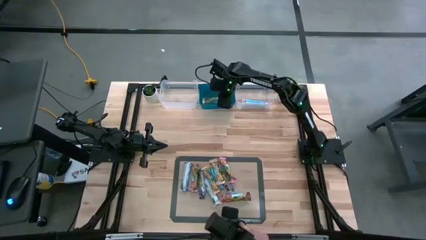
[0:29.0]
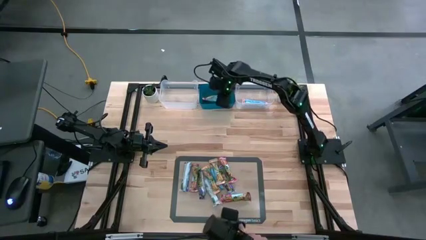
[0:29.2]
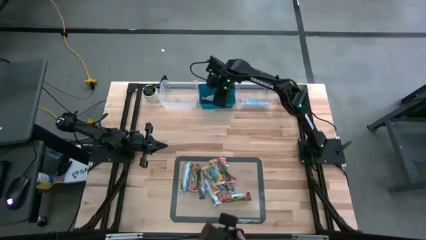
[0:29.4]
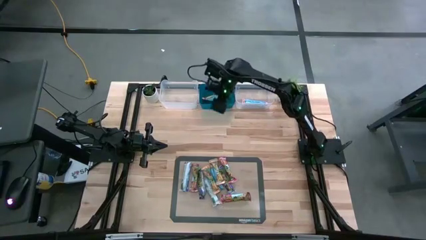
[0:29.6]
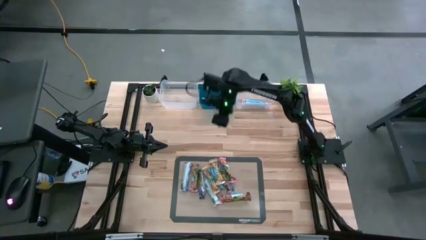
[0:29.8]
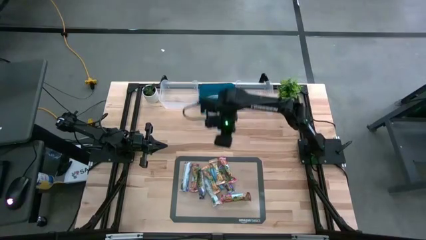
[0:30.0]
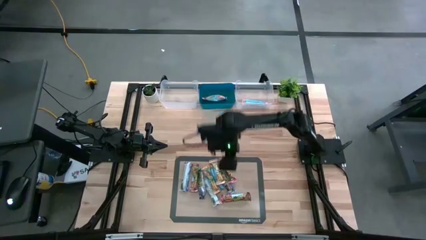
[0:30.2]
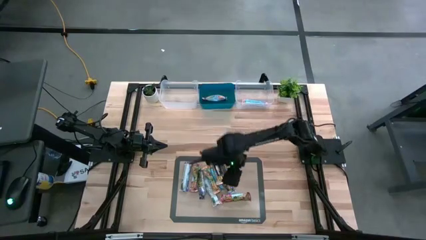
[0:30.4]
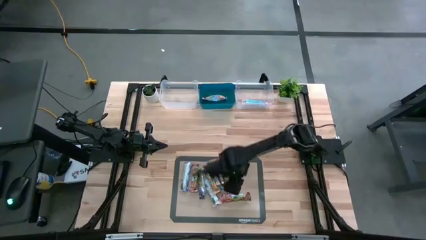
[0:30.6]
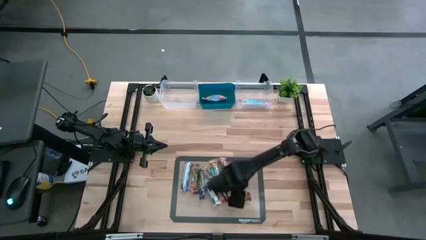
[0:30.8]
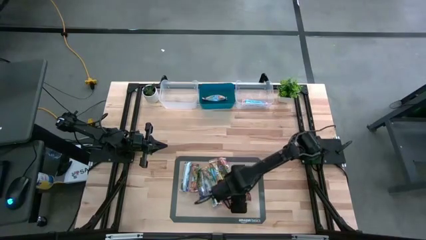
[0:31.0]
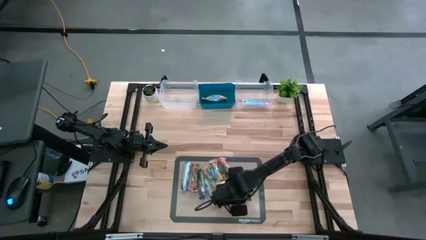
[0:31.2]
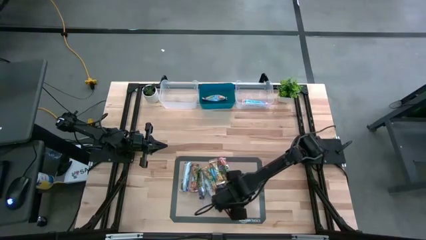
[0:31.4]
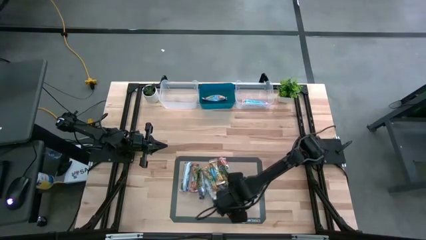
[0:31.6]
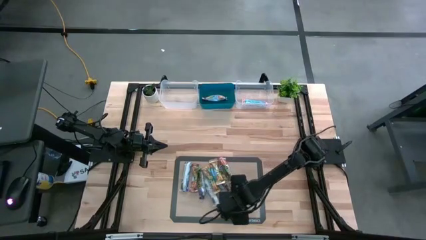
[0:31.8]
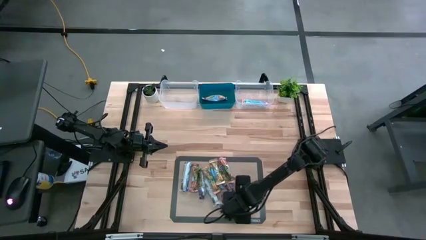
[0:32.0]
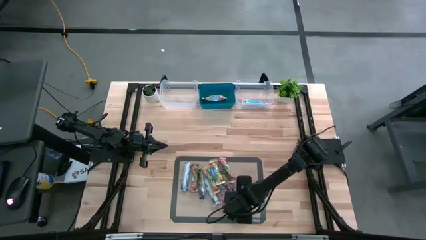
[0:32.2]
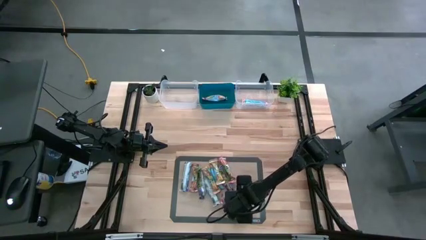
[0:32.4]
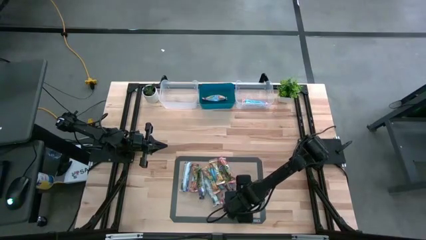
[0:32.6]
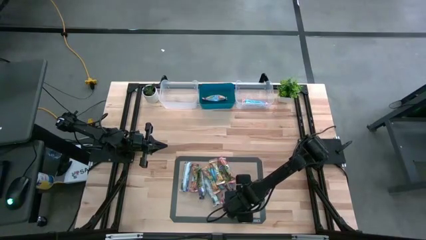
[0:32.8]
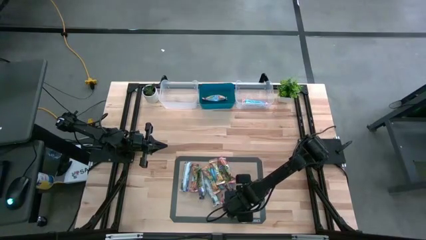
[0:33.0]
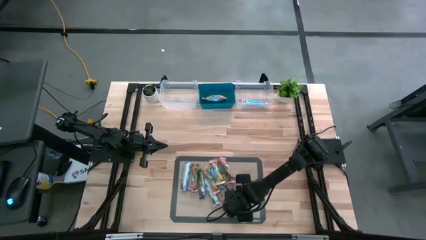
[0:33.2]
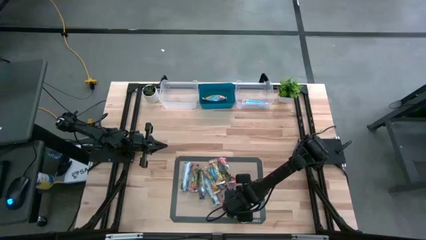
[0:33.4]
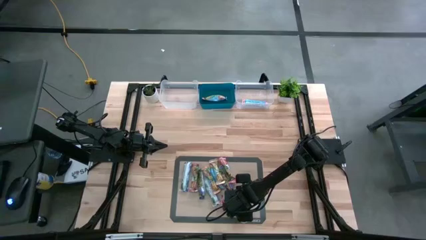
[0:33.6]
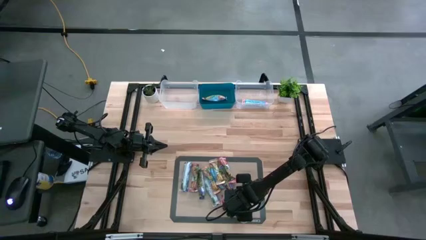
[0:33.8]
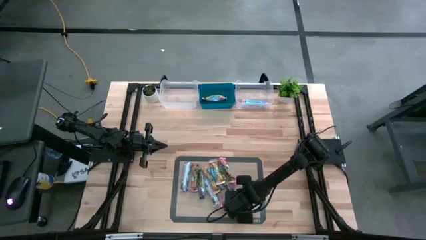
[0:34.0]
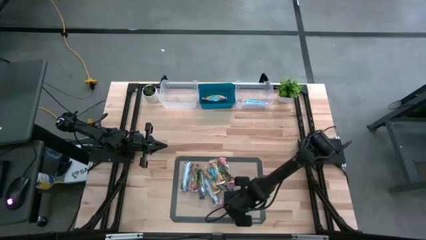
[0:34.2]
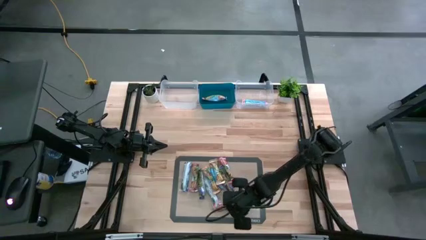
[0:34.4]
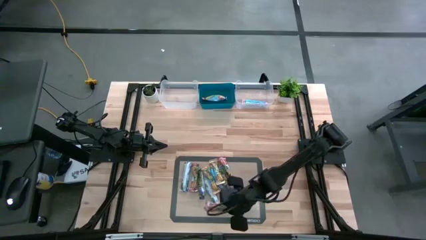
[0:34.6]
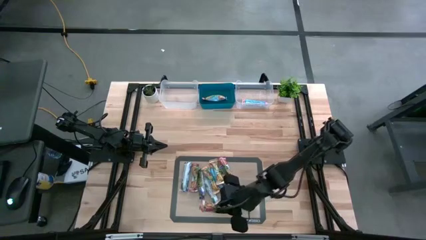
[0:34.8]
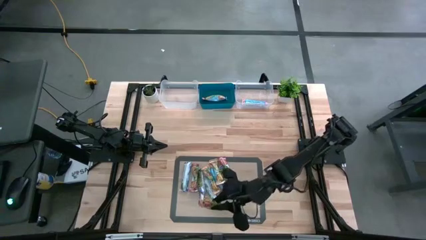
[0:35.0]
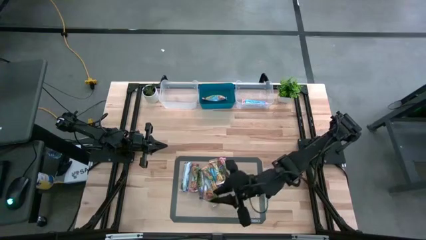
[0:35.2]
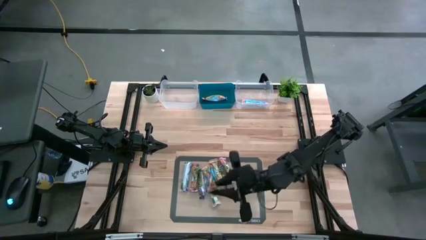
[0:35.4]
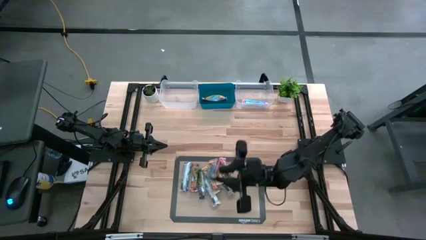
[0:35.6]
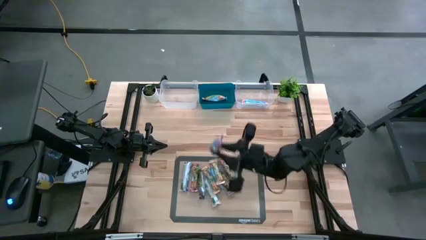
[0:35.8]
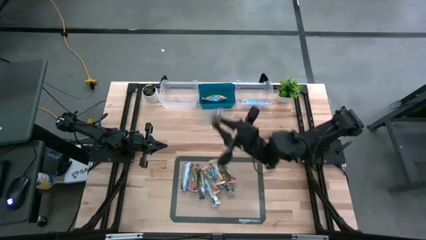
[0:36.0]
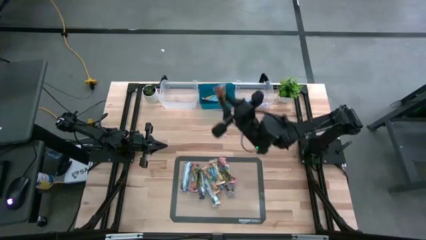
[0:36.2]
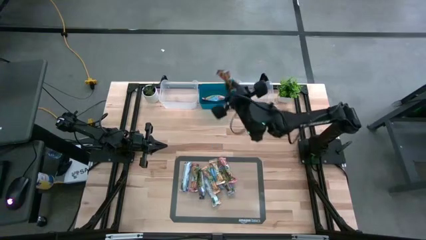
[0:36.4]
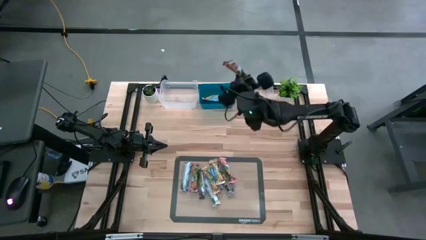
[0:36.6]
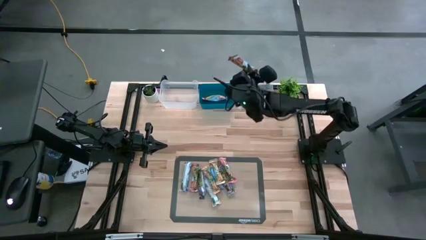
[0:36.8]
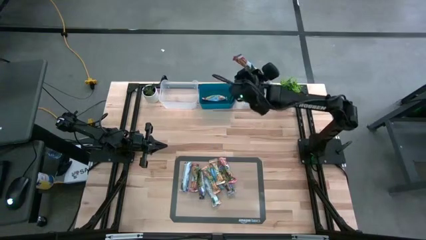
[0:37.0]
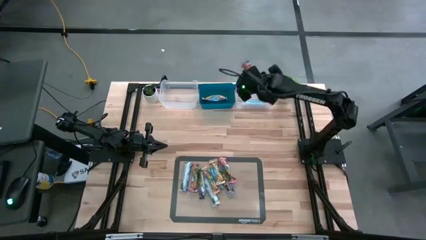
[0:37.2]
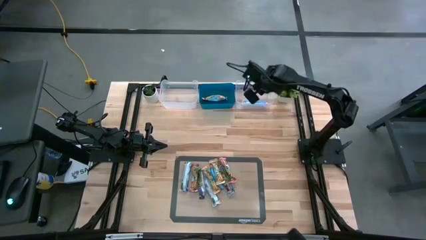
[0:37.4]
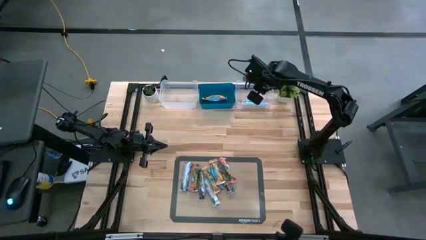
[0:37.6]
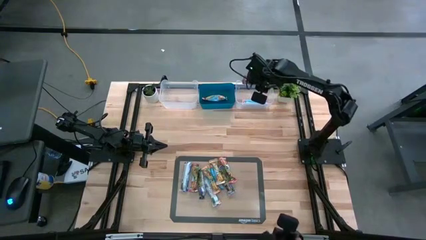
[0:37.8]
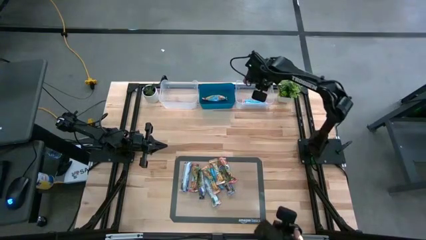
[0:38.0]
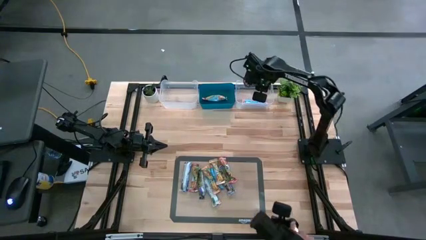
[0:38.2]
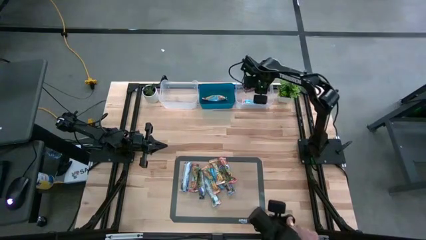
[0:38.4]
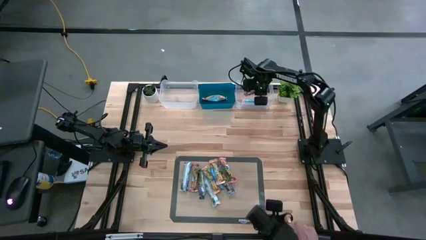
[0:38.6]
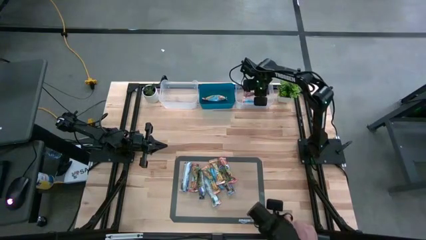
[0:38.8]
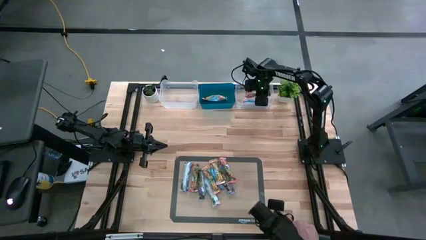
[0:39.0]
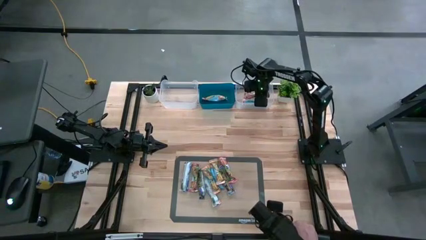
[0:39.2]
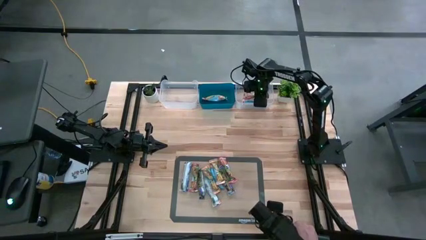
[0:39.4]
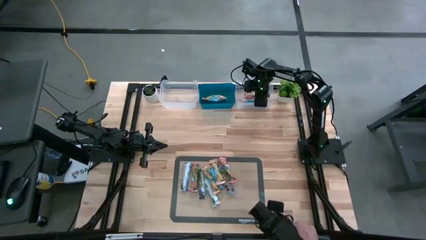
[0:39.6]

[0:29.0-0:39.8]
Task: Pick and place Granola Bars by type
Put the red granola bar into the right transparent bin

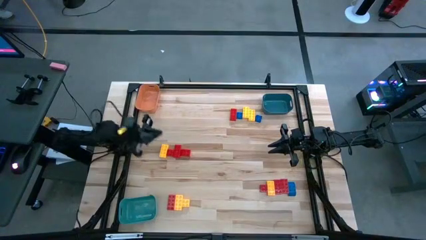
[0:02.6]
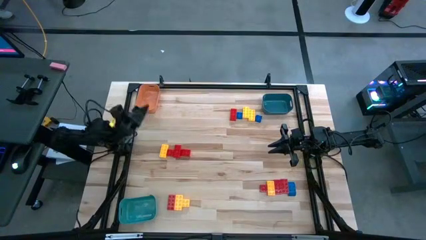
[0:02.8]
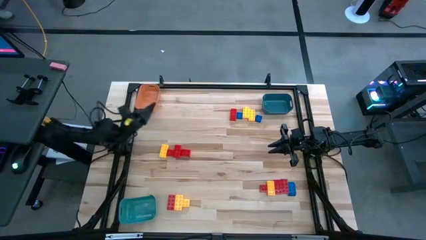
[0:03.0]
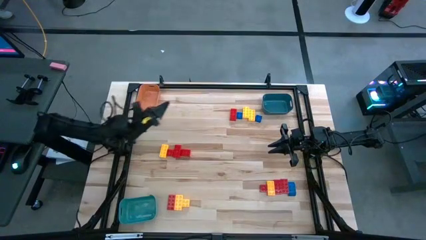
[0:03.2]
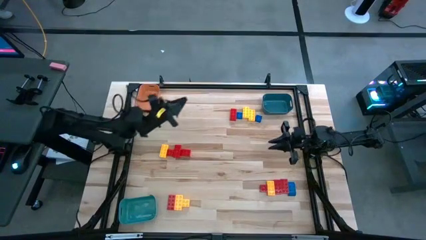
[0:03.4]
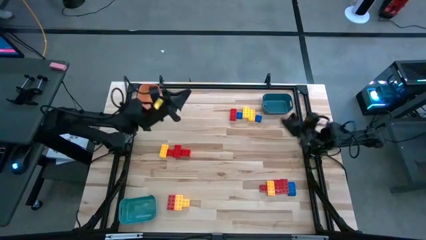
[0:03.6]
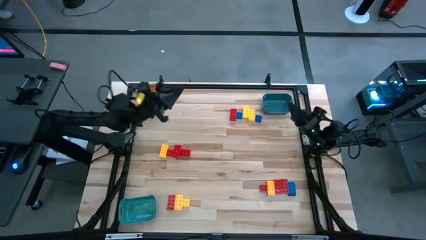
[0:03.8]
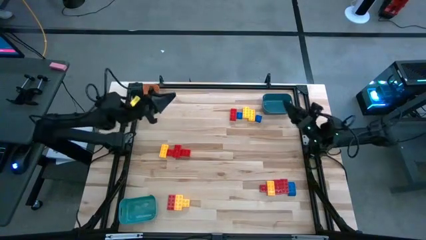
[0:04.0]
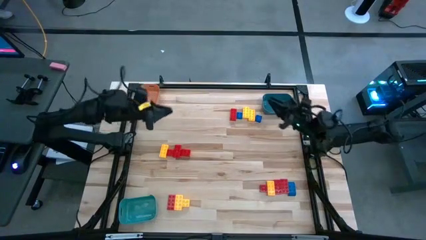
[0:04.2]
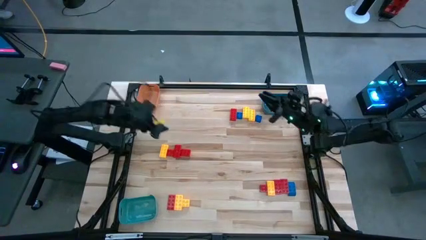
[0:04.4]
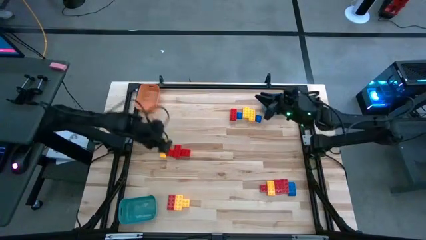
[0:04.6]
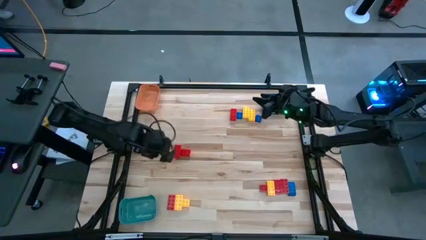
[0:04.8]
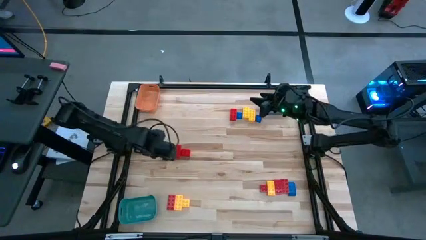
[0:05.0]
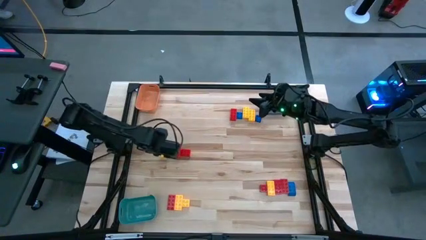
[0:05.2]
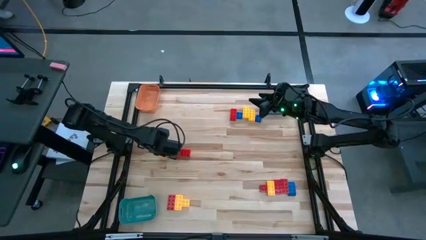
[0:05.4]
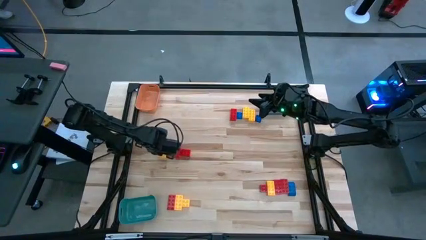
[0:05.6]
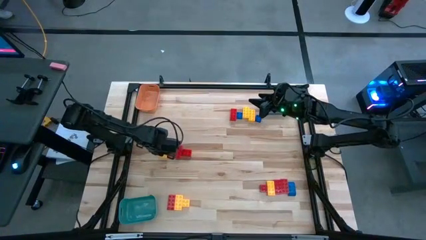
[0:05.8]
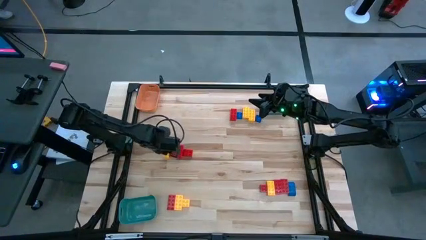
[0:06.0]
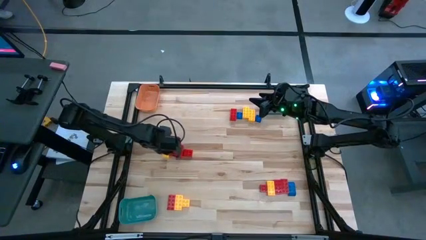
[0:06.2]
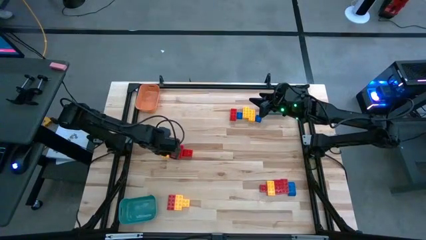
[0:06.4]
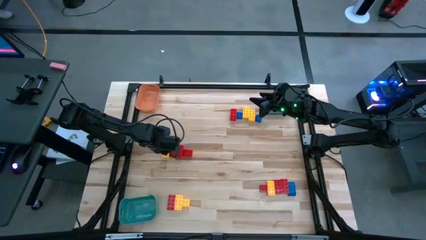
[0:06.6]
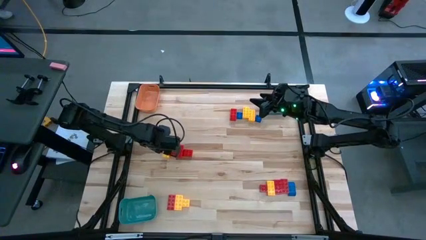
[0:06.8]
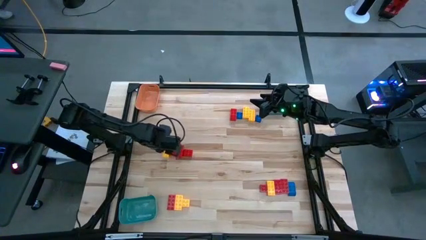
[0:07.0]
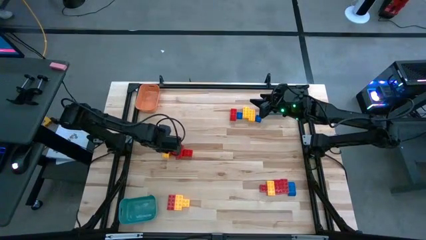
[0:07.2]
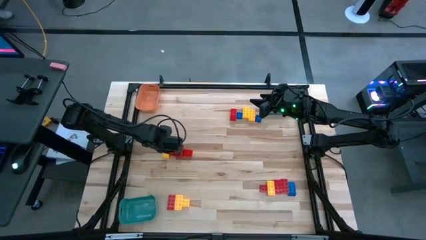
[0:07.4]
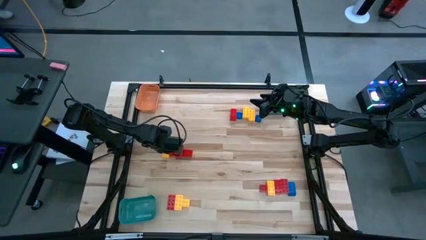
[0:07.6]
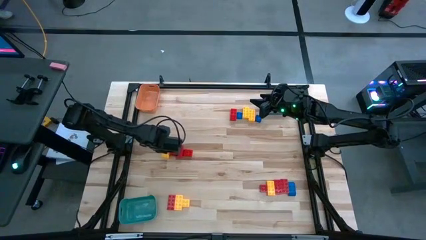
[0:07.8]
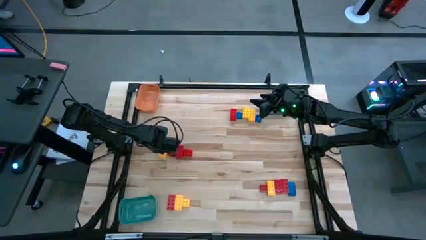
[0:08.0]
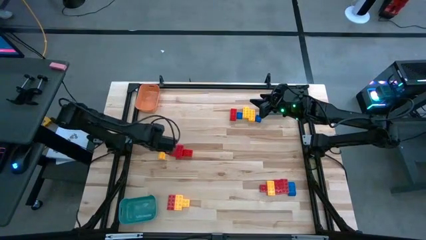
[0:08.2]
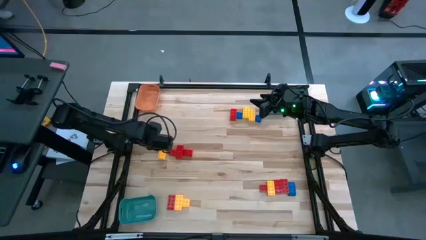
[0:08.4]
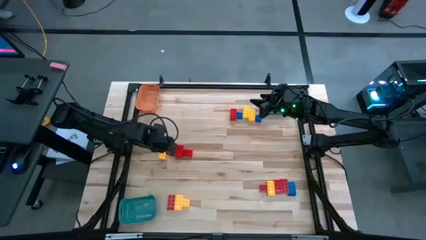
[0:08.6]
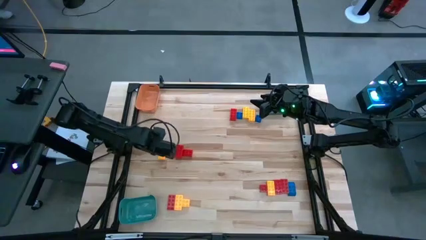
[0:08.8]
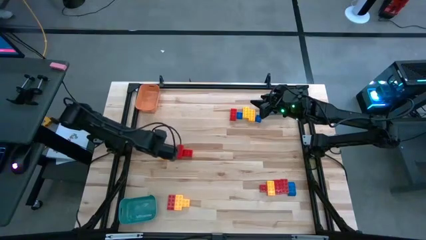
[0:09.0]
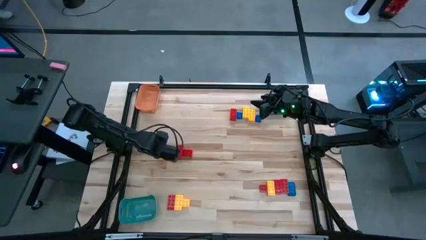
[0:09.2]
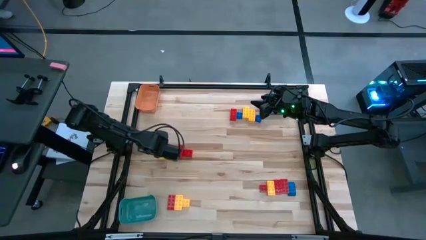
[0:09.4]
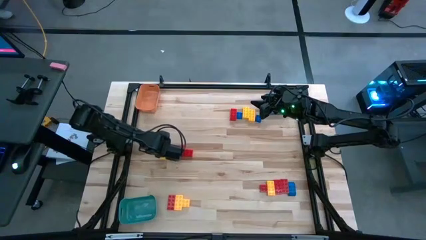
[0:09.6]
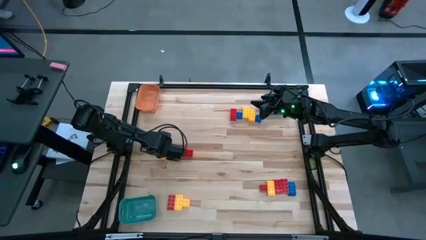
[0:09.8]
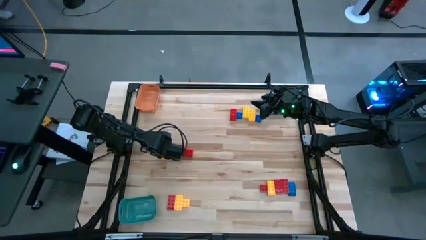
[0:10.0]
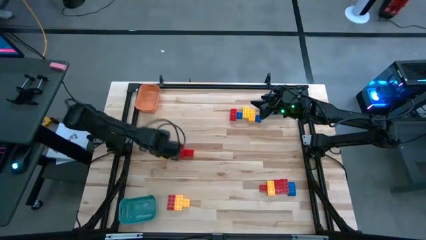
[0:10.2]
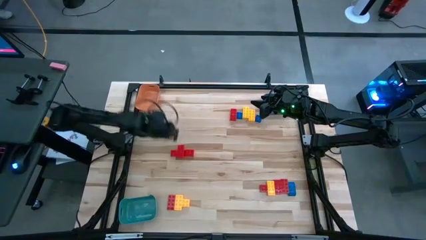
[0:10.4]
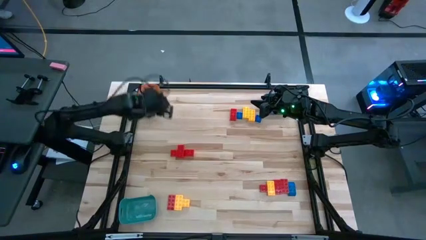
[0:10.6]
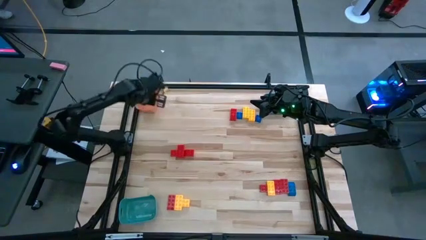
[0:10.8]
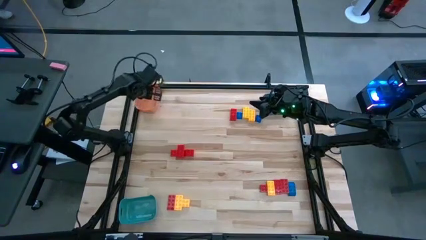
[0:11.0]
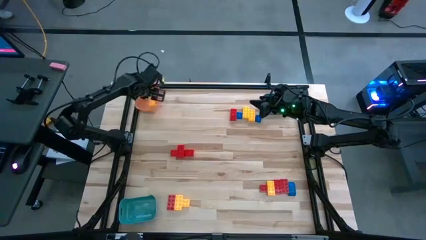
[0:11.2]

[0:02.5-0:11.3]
Task: Sort blocks
Put the yellow game piece into the green bin
